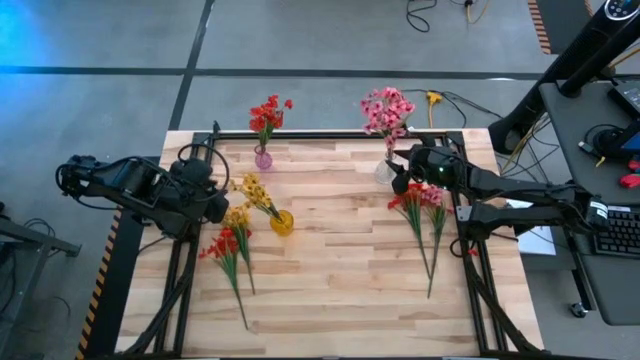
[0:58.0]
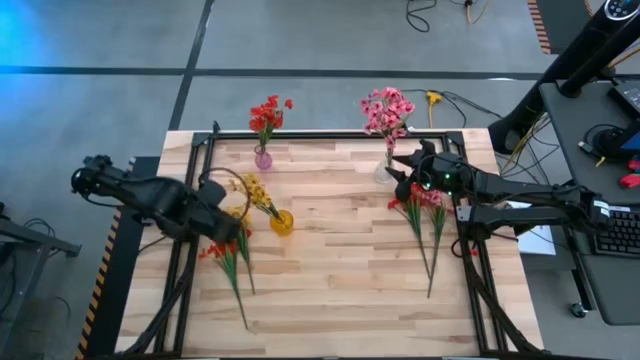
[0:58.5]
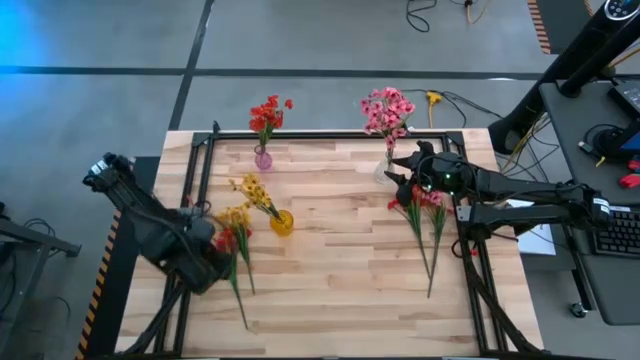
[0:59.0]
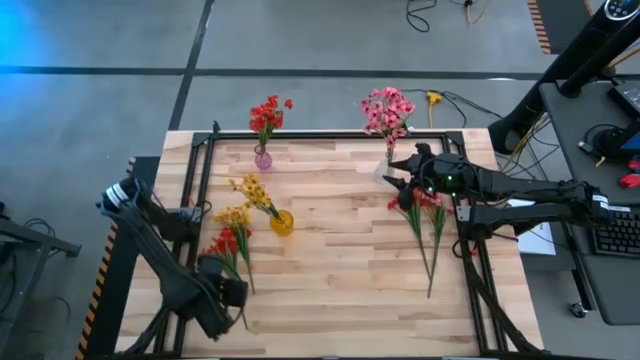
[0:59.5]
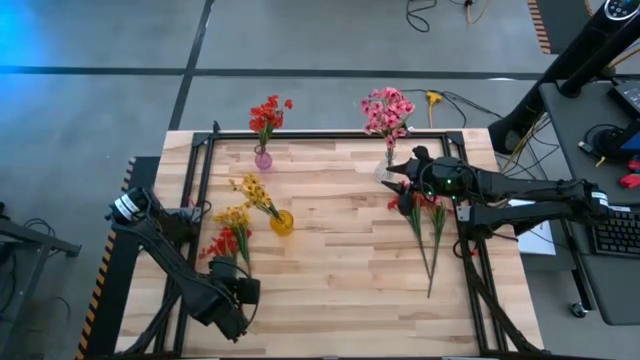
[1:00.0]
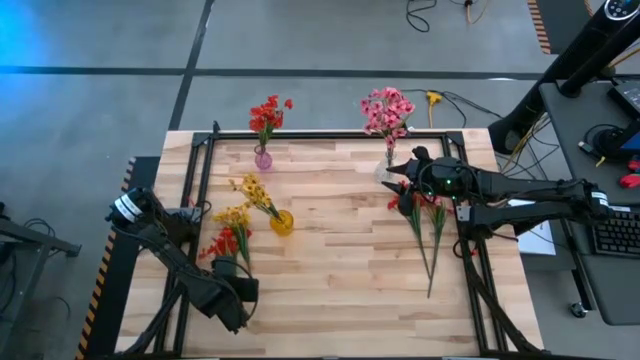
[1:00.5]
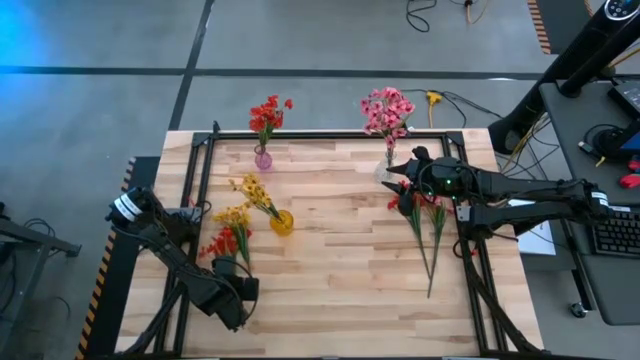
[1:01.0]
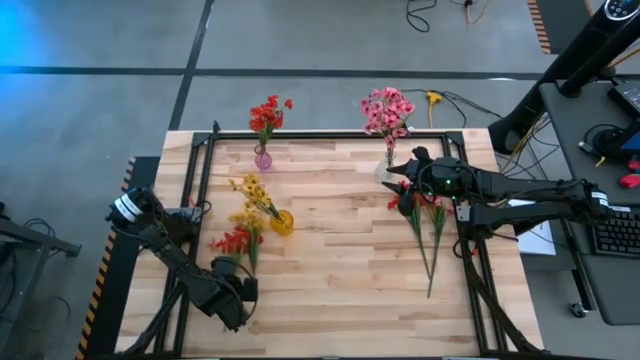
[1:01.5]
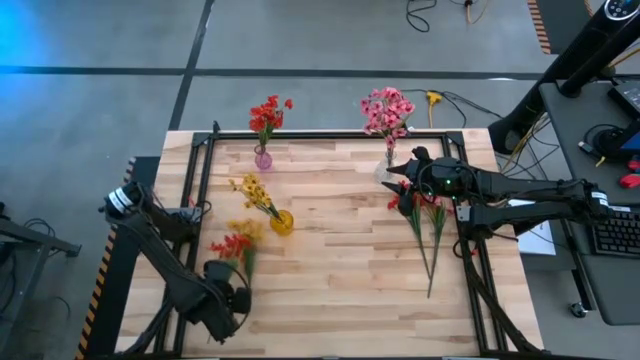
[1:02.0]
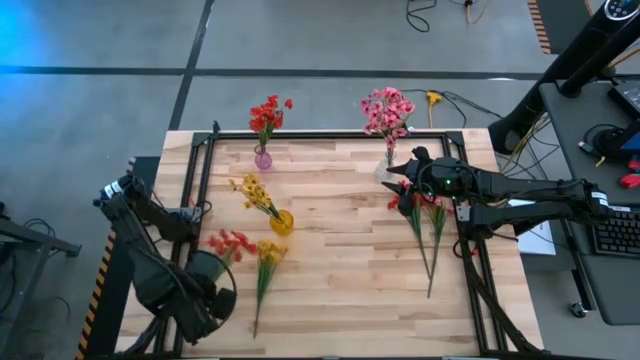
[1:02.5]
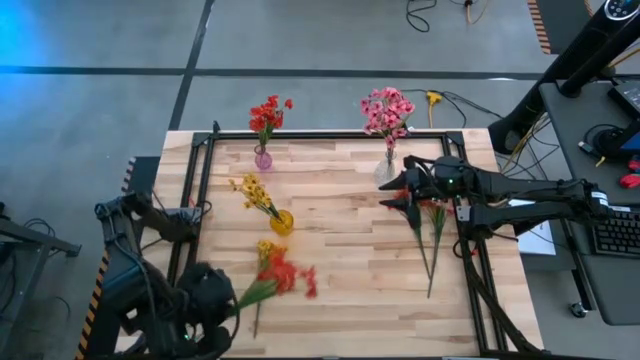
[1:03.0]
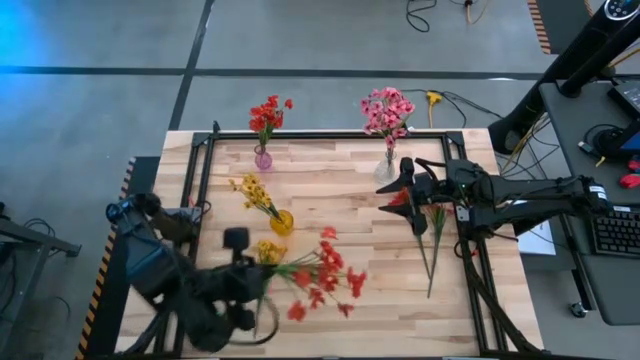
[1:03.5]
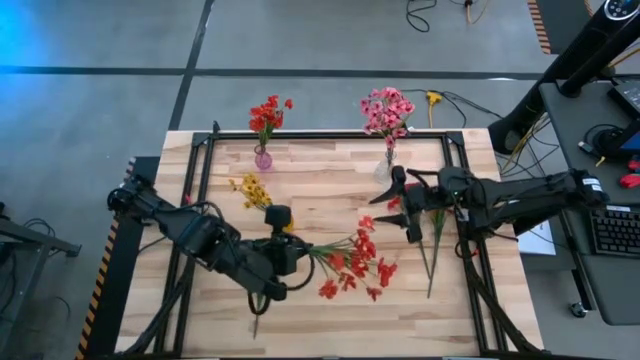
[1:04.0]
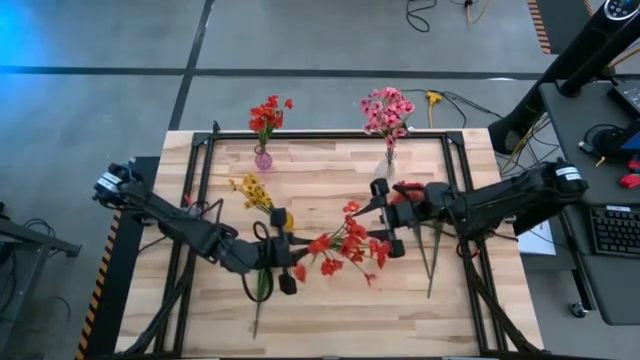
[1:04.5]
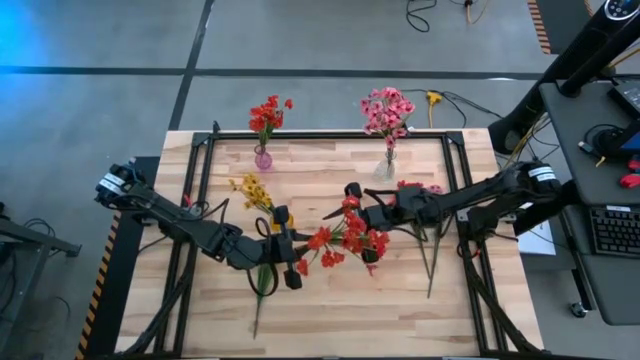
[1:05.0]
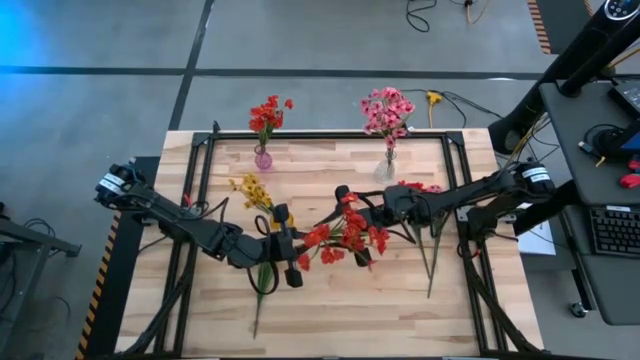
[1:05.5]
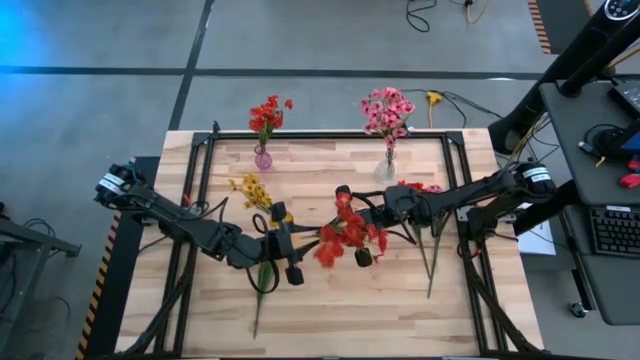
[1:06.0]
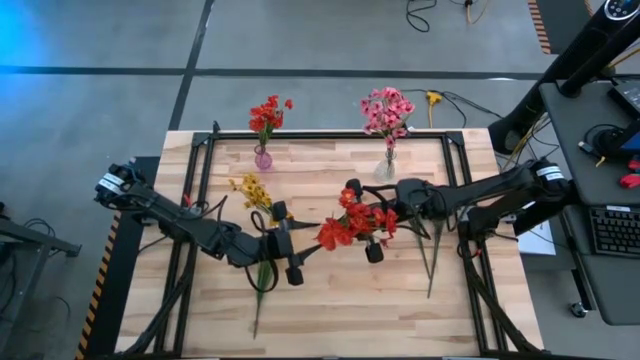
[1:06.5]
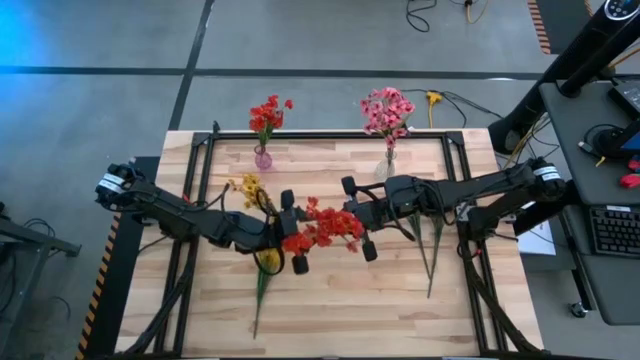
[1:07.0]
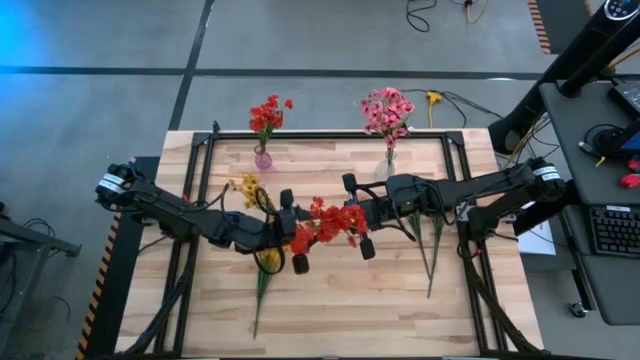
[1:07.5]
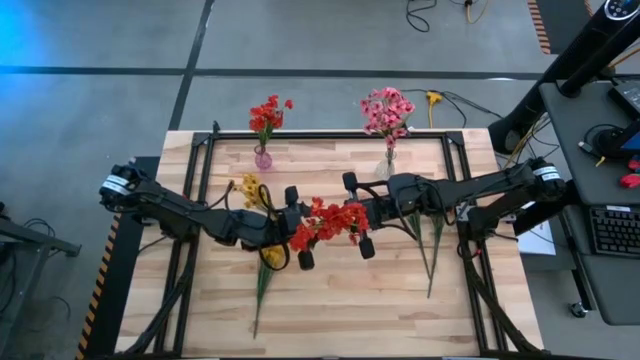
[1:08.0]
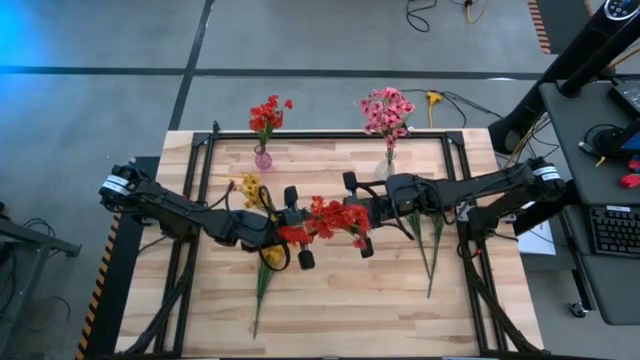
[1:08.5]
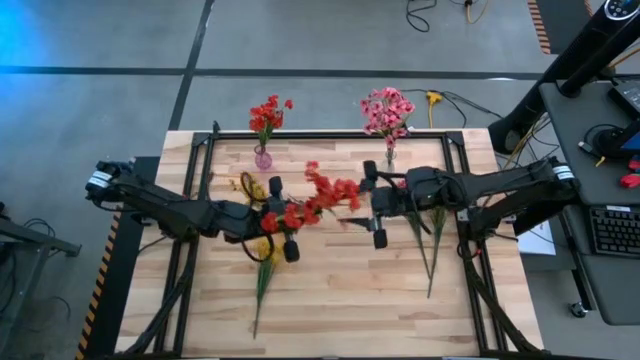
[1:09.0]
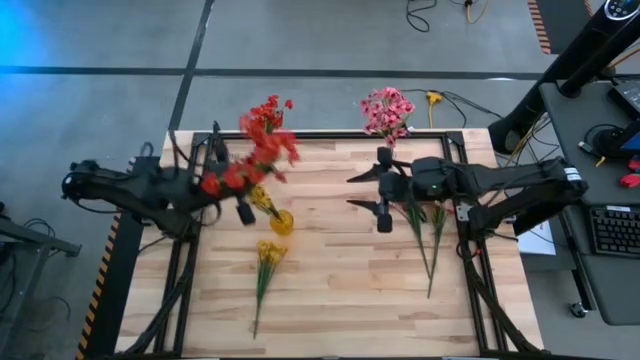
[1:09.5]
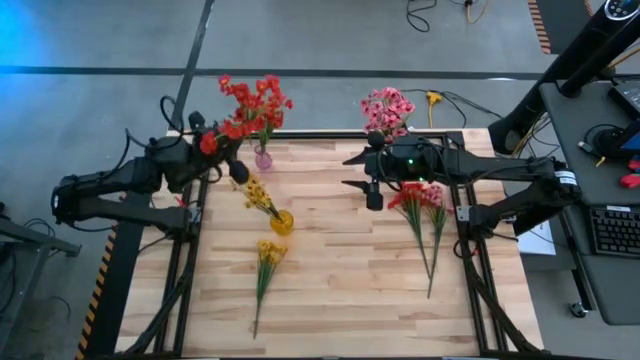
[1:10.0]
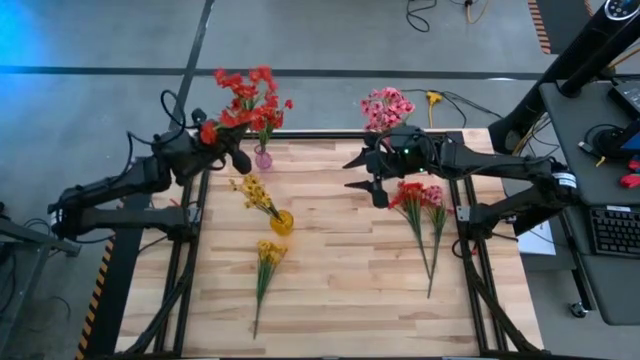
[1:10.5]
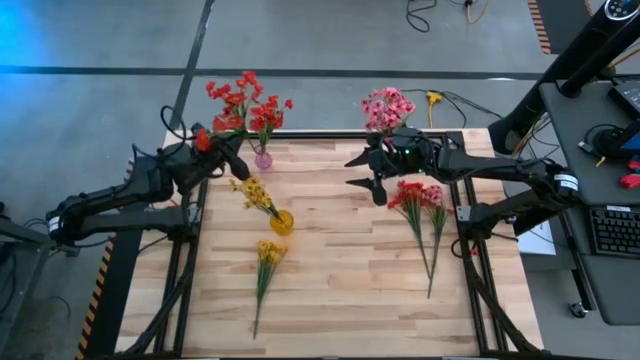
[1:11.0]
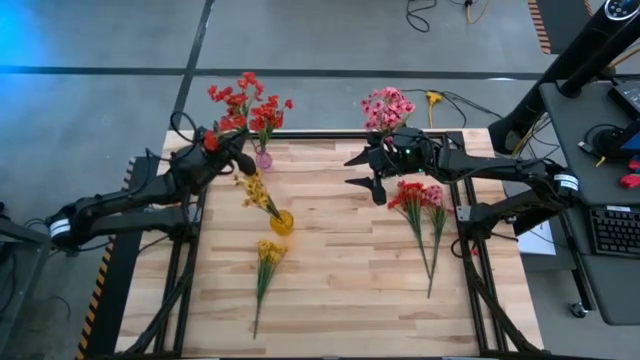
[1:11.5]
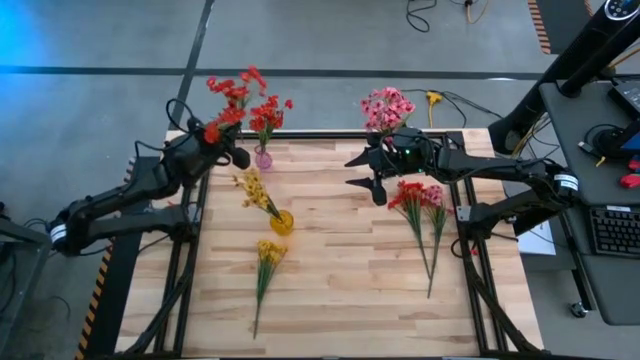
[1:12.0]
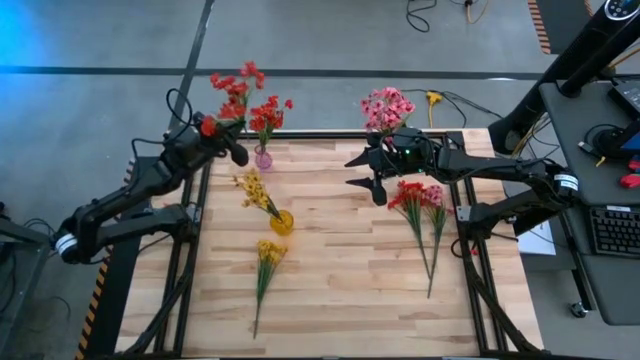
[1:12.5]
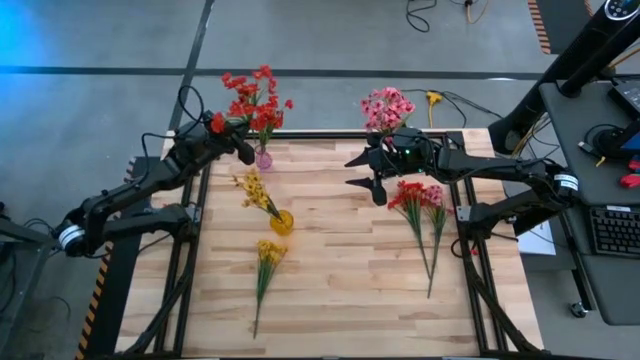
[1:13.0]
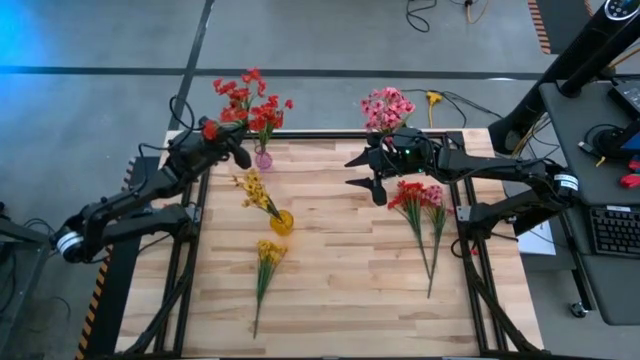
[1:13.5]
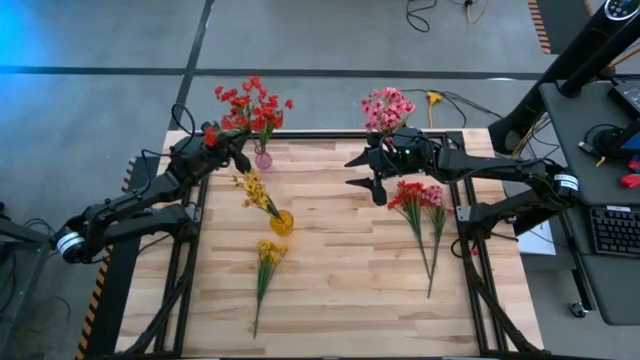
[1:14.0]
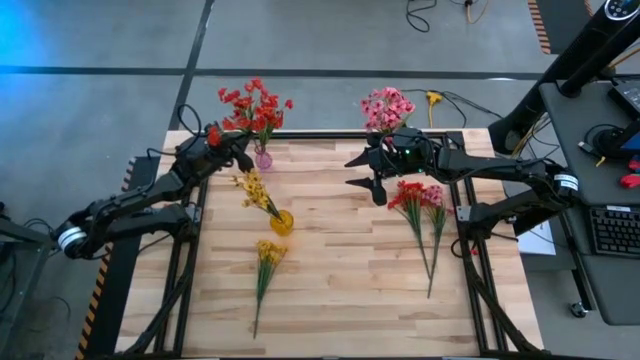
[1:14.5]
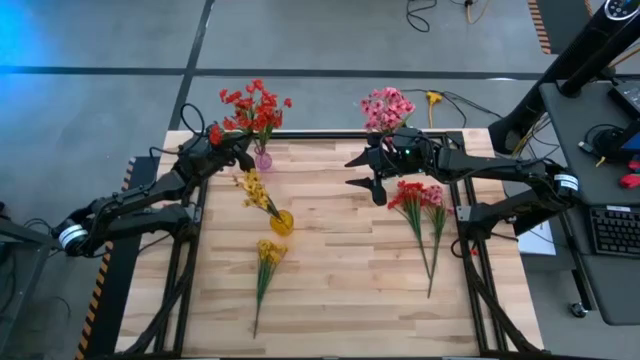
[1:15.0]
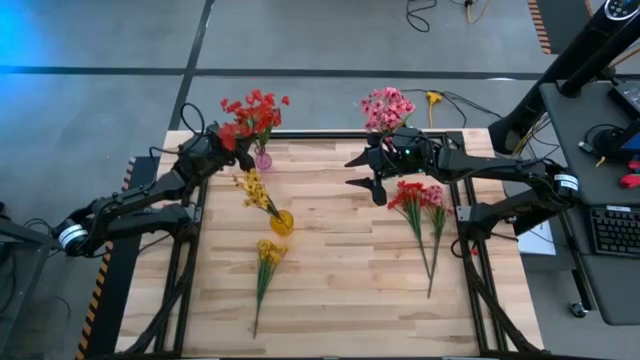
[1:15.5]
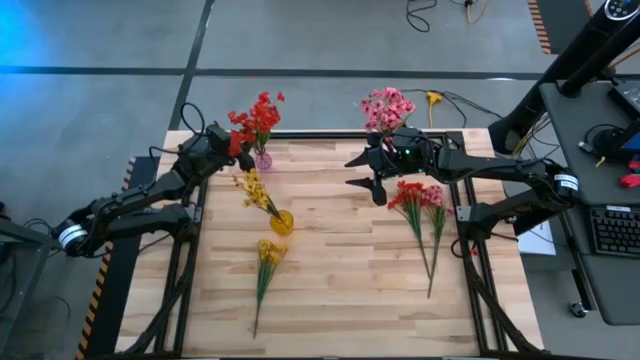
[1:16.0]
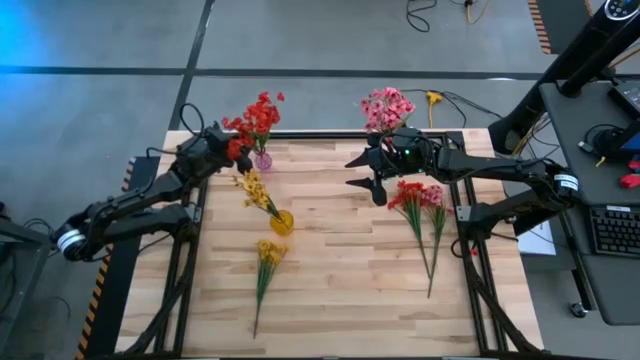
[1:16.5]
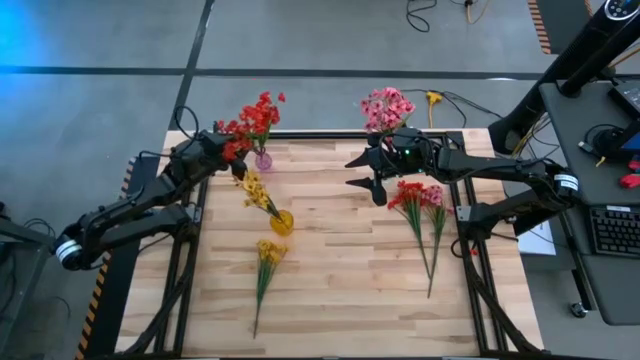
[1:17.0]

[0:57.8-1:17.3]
Task: Sort flowers into vase by color
Put the left red flower into the purple flower vase
